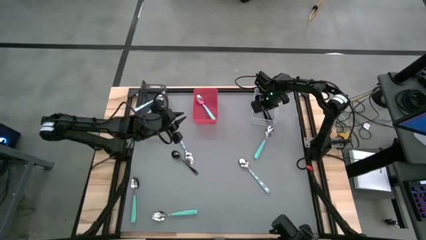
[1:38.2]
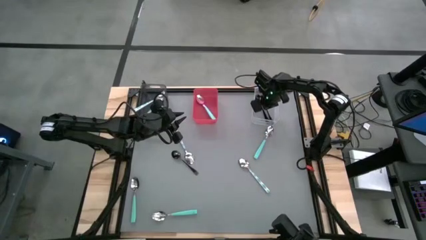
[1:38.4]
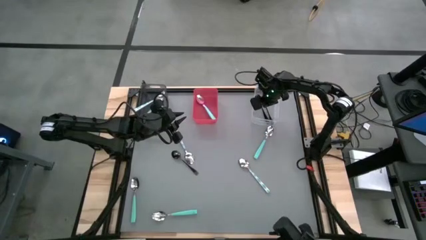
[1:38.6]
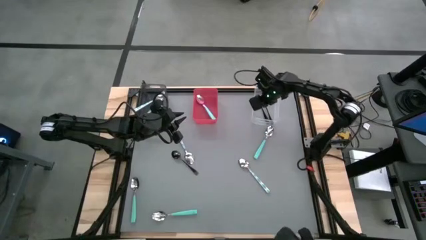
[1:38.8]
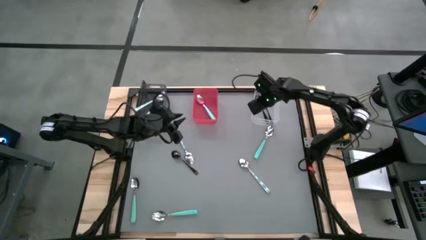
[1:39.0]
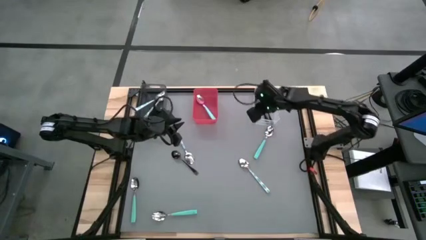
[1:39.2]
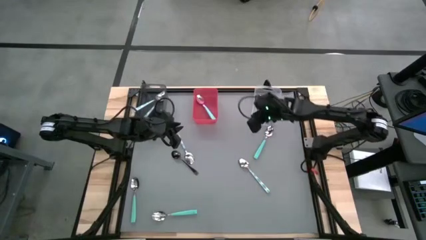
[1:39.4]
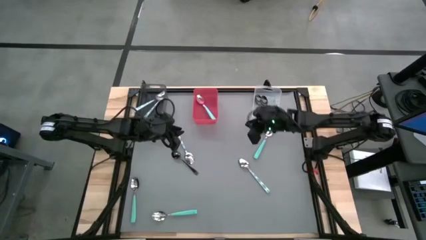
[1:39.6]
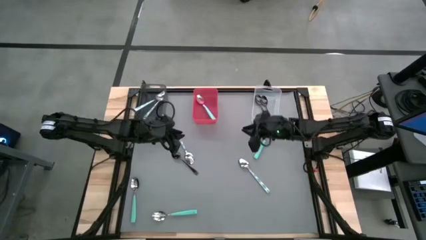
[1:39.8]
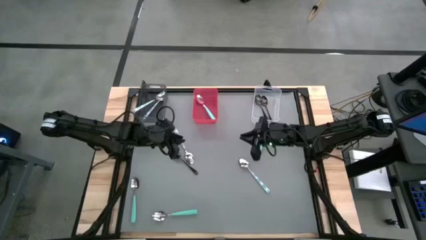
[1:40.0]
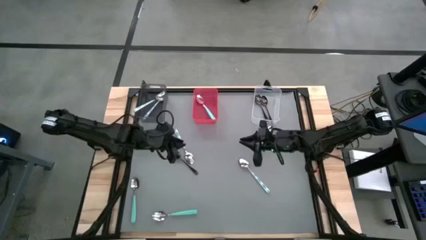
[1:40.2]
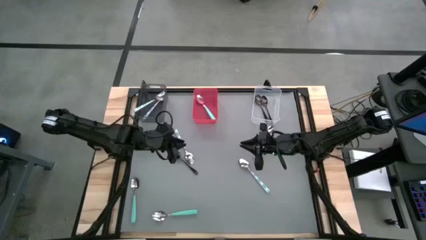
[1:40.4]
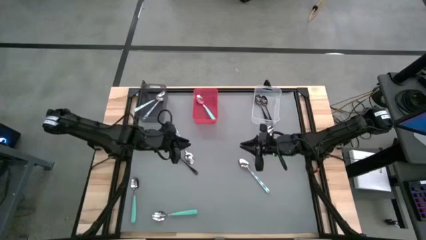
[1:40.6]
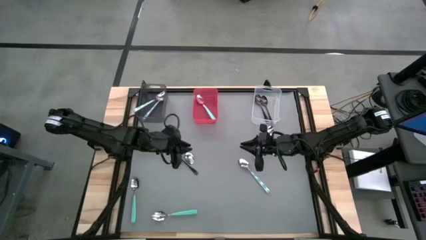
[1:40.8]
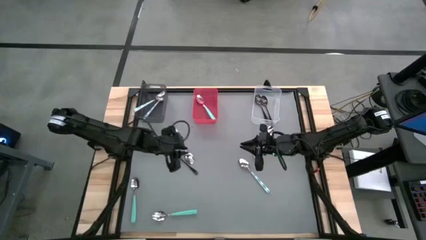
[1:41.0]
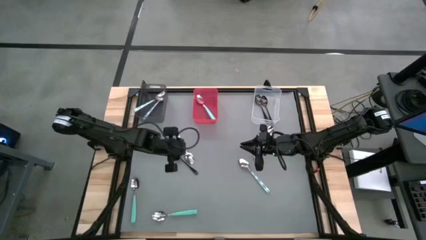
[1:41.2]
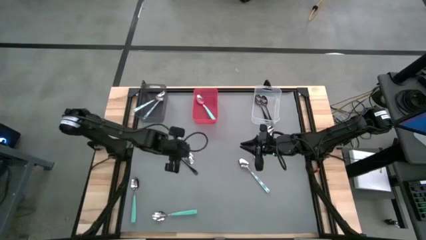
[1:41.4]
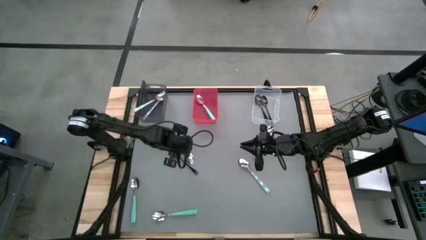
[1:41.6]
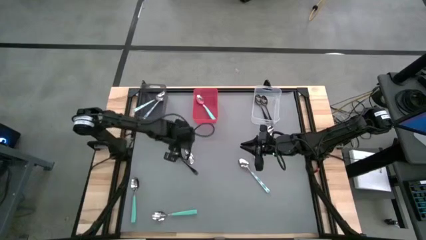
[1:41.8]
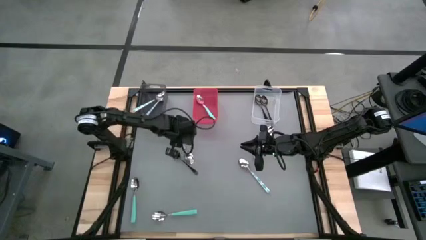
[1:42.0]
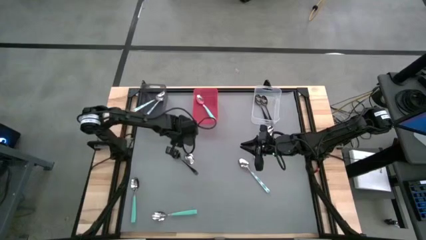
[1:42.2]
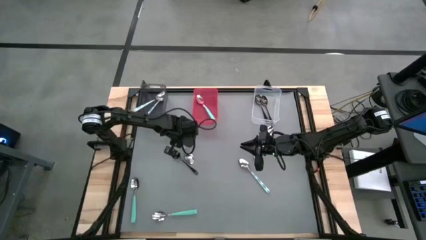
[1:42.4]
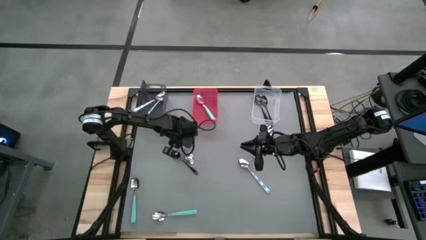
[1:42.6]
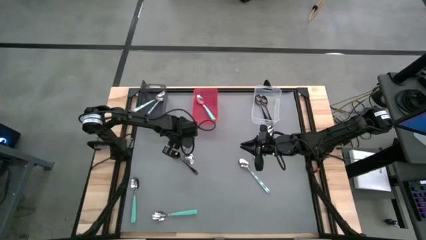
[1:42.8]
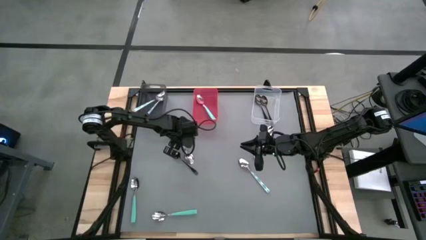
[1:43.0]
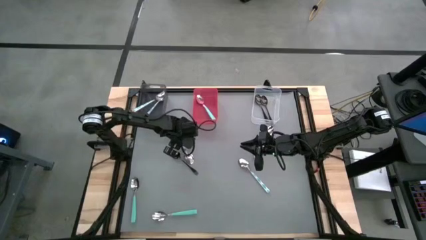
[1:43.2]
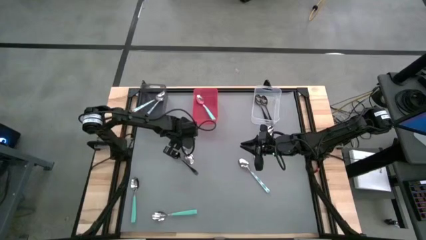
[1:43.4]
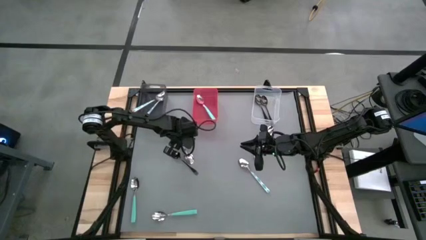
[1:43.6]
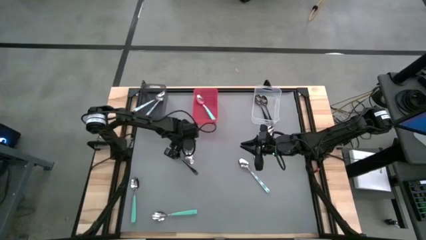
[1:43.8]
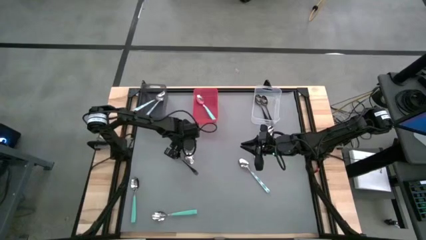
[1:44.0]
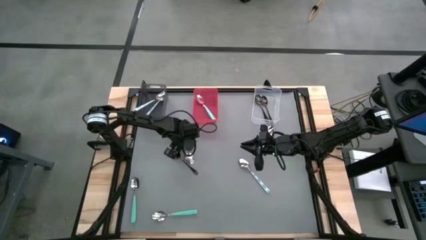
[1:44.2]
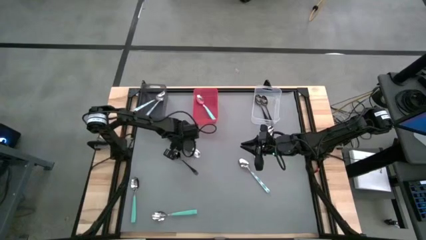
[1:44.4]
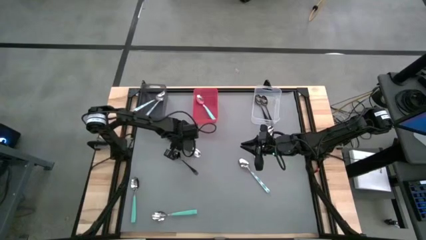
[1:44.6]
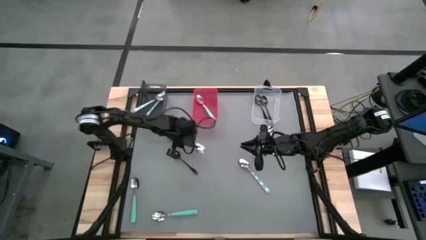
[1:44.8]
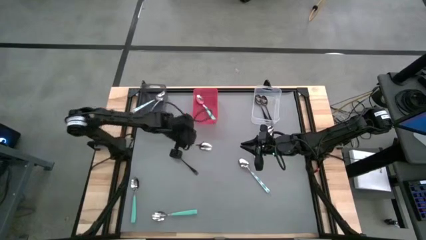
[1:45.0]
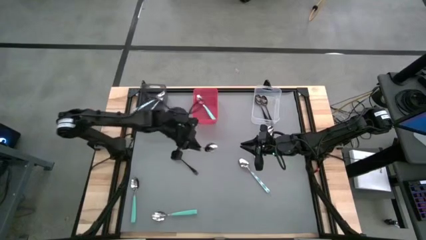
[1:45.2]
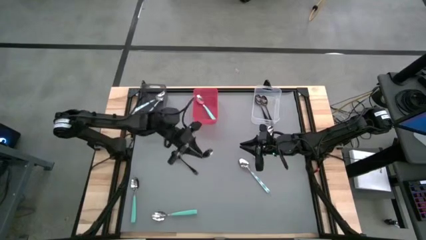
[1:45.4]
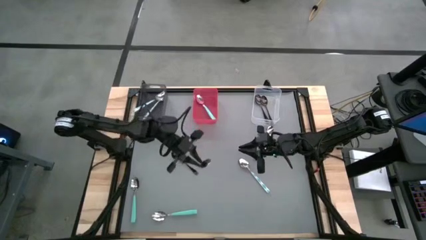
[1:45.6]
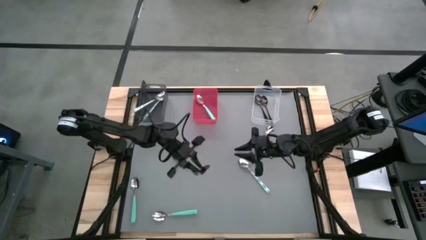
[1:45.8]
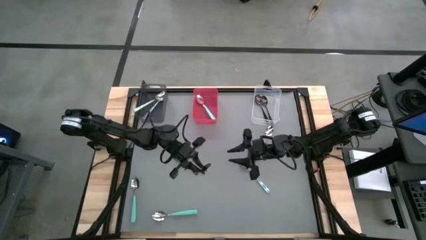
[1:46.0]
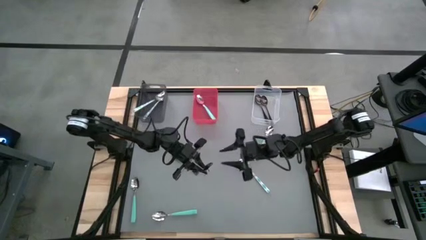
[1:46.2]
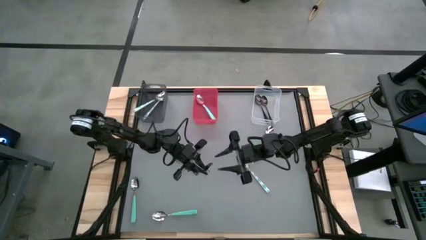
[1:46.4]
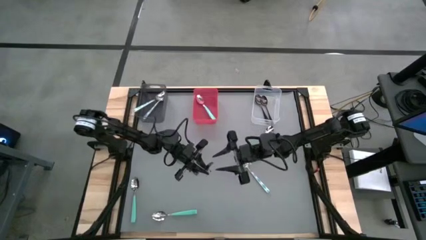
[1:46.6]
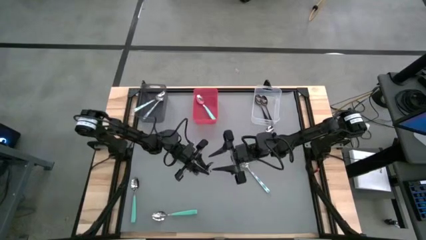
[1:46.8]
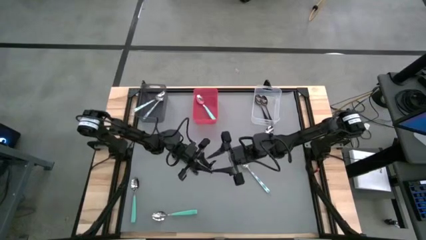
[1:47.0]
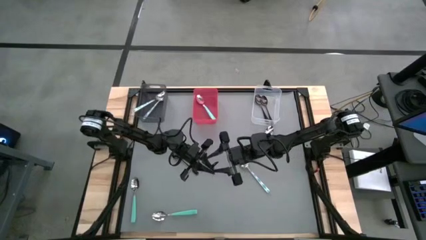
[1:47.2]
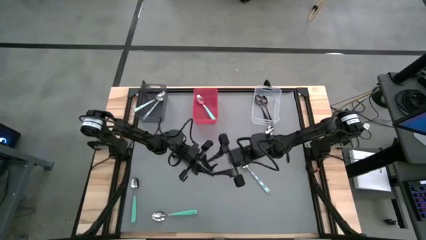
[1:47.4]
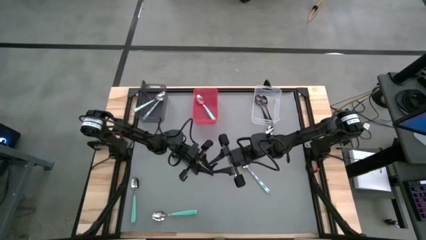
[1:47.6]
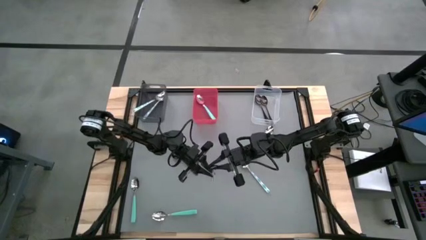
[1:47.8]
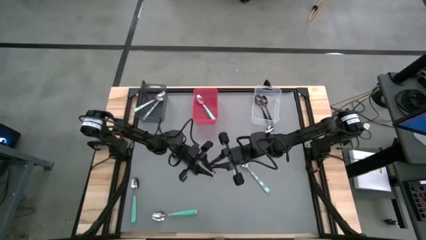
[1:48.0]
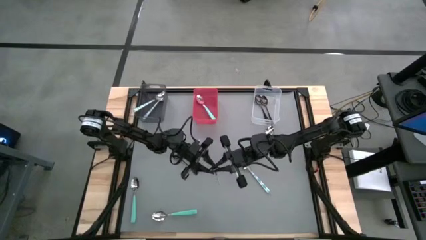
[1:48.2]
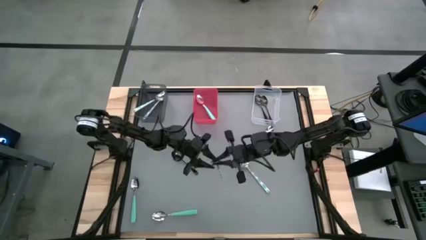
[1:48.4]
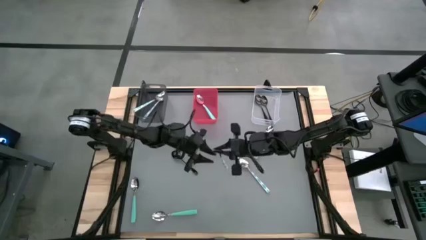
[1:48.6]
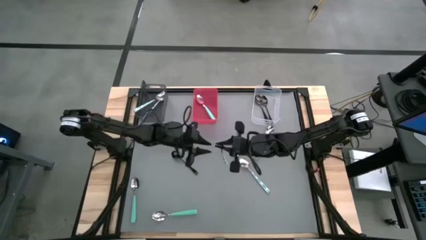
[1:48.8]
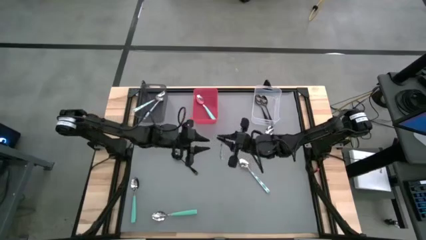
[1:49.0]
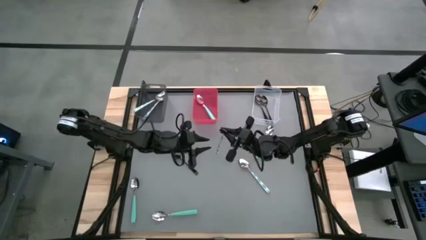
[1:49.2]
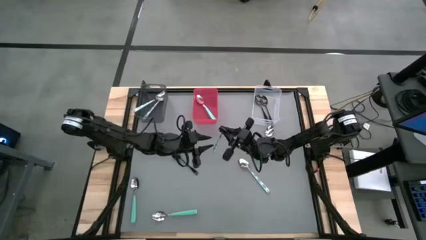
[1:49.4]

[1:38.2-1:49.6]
Task: Sort silverware by color (type)
Put the blue patterned spoon into the black bin

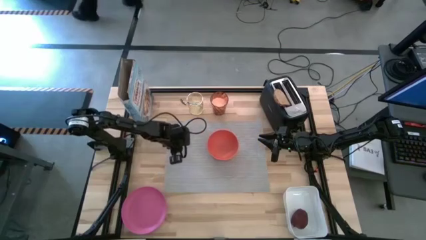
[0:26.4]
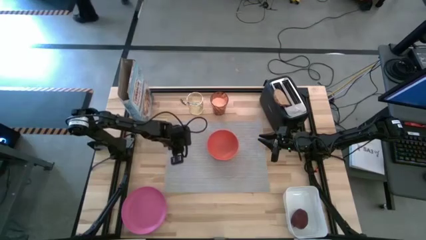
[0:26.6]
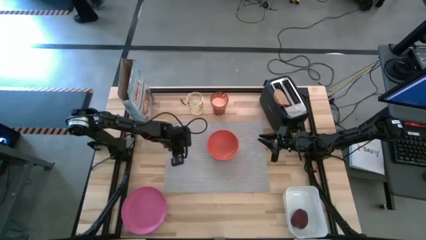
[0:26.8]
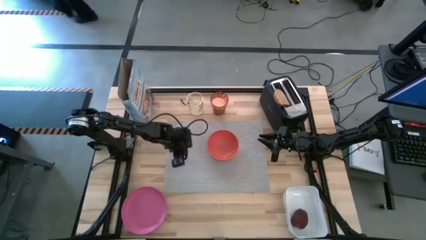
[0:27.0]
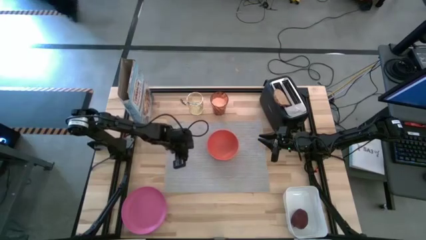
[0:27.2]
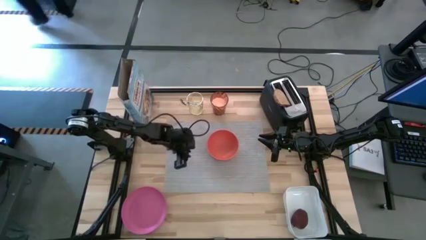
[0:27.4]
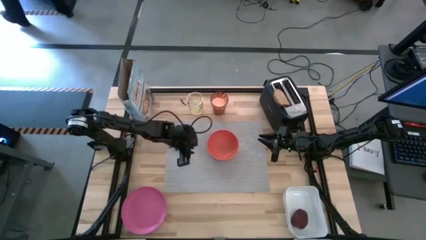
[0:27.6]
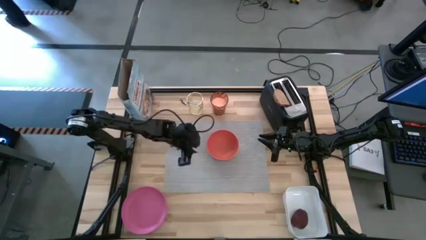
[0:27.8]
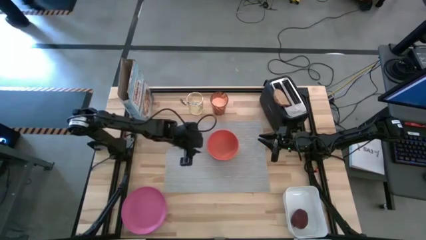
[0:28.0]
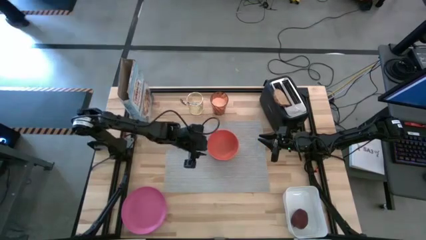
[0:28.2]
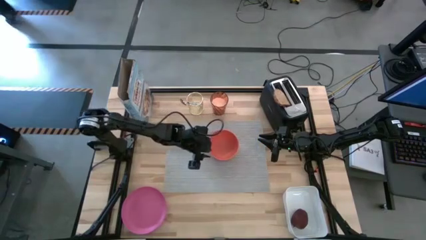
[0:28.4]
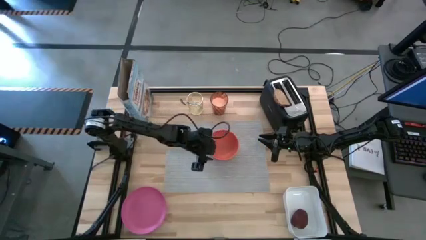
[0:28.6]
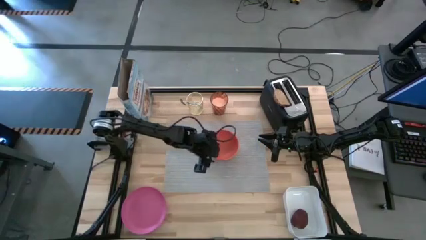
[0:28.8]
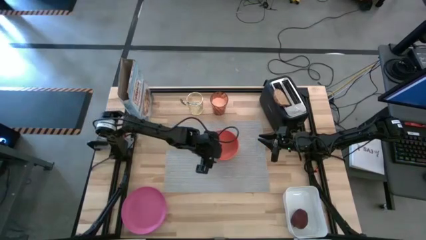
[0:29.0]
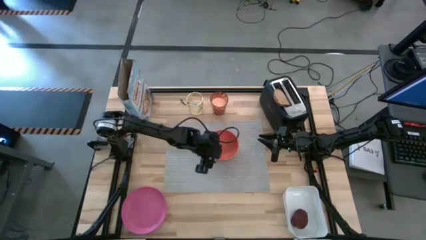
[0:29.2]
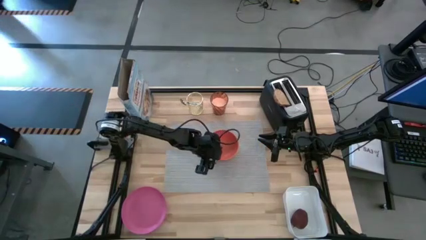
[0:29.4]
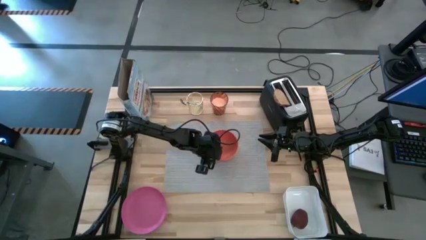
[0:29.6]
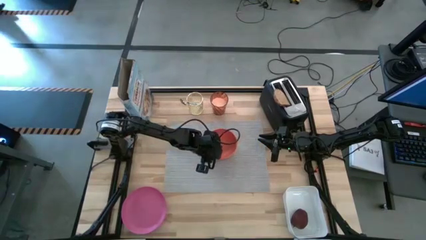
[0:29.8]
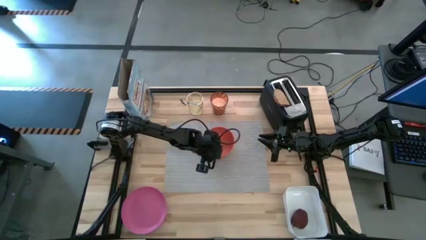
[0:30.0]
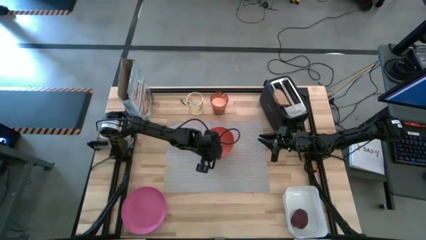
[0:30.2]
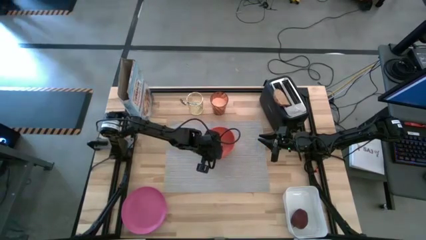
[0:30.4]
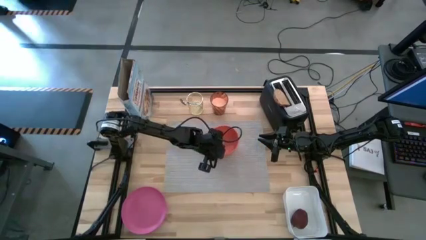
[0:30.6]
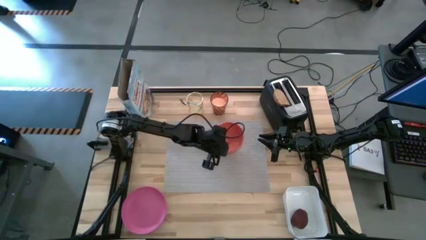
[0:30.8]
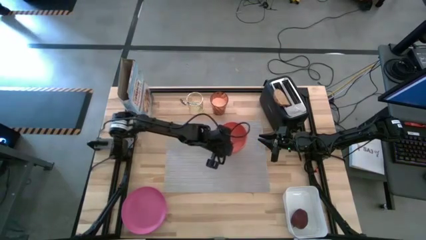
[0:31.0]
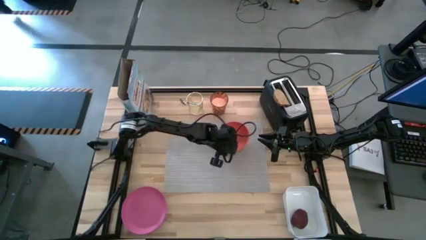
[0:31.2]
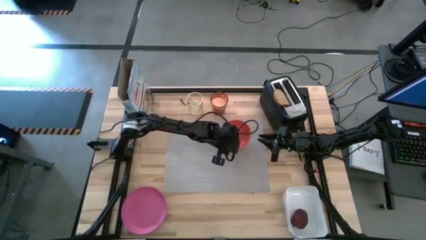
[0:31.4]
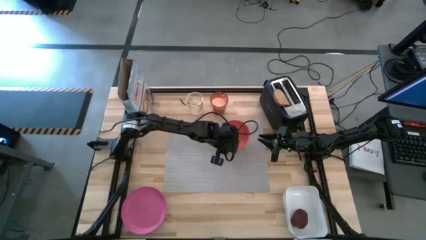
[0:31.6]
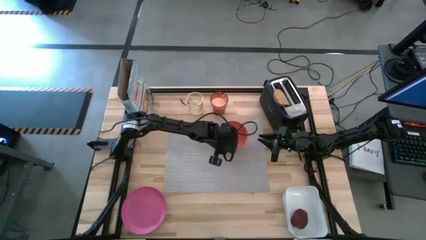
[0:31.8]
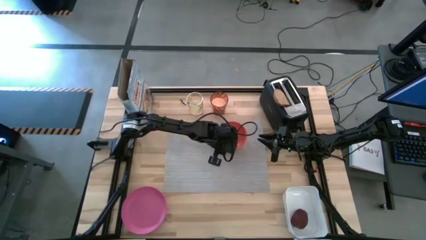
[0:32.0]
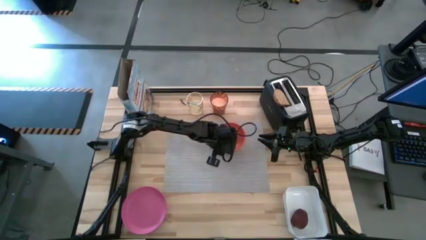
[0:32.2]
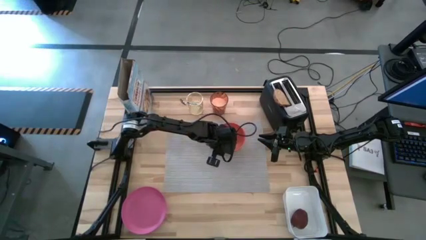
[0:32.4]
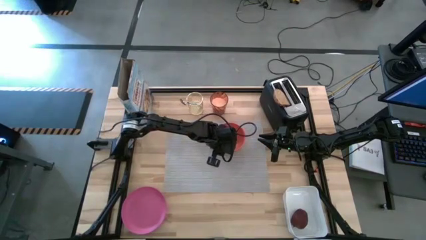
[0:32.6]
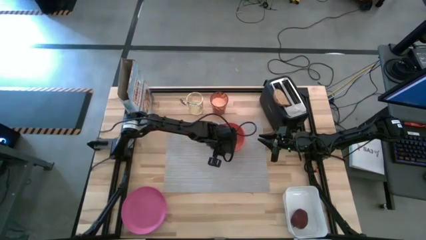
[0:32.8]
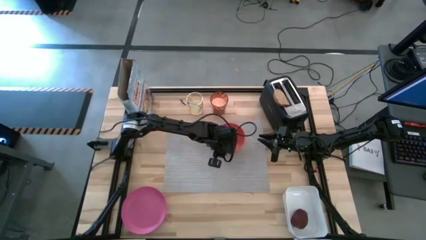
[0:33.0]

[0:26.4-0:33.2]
Task: Arrange a breakfast setting
Adjust the red bowl on the gray placemat
